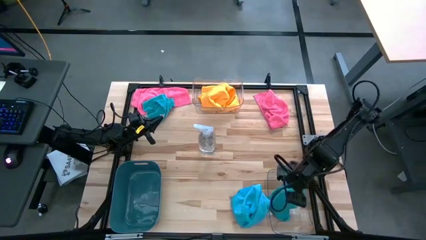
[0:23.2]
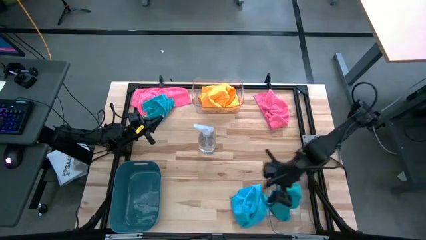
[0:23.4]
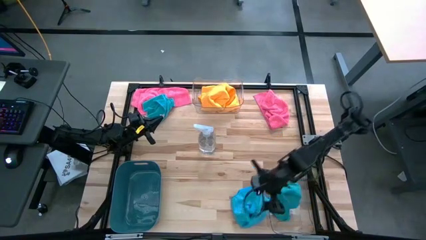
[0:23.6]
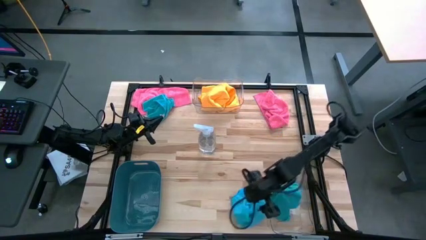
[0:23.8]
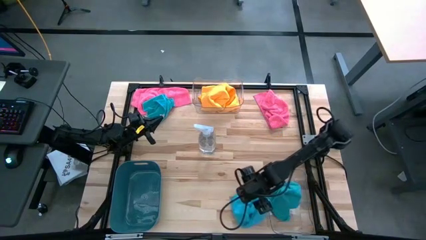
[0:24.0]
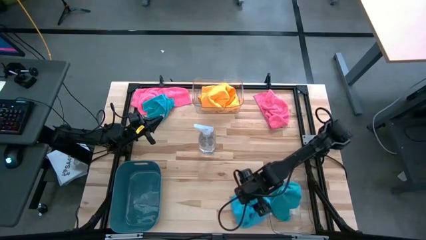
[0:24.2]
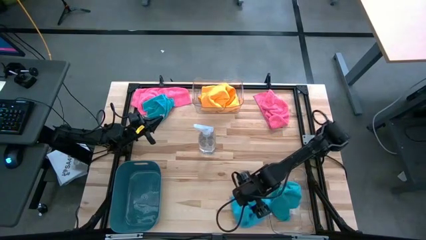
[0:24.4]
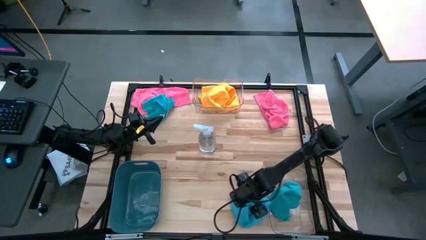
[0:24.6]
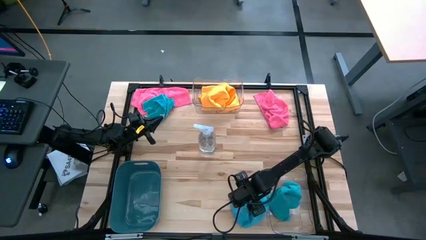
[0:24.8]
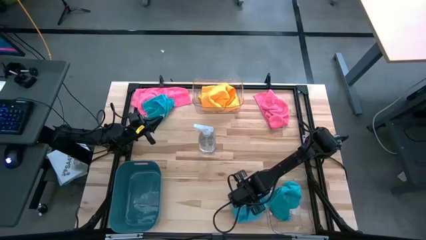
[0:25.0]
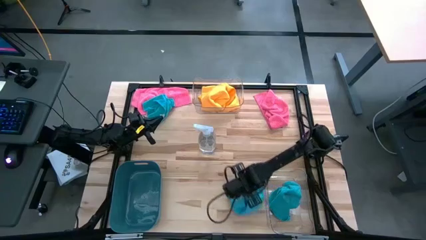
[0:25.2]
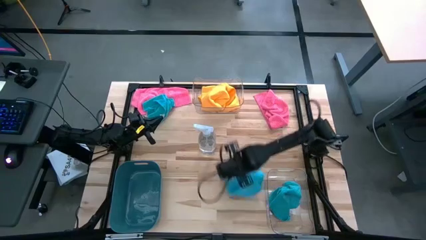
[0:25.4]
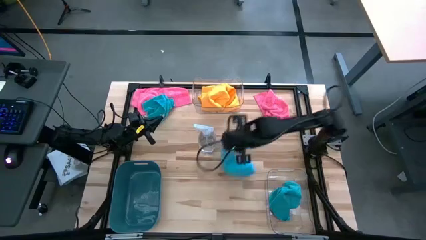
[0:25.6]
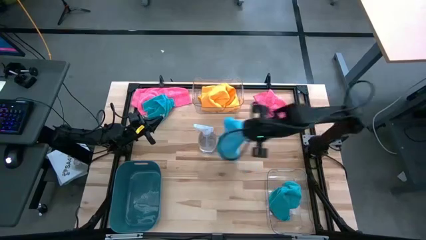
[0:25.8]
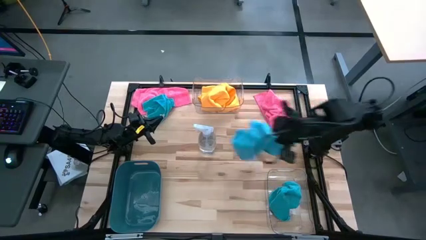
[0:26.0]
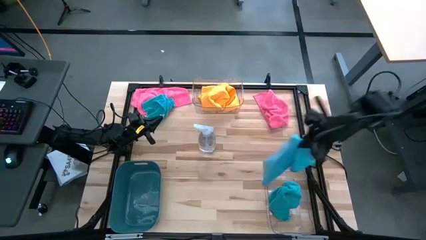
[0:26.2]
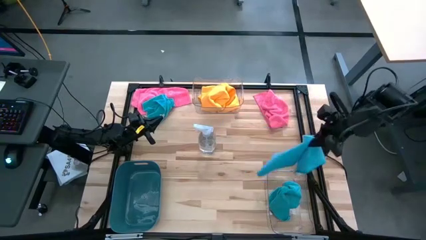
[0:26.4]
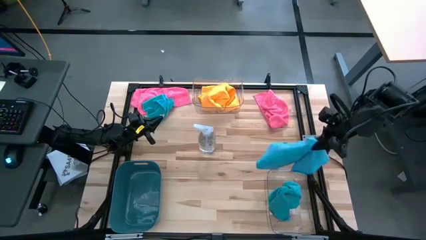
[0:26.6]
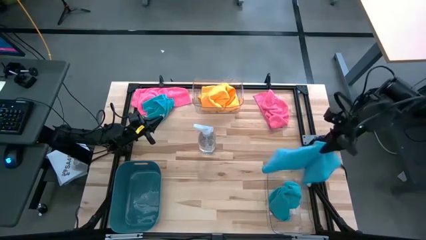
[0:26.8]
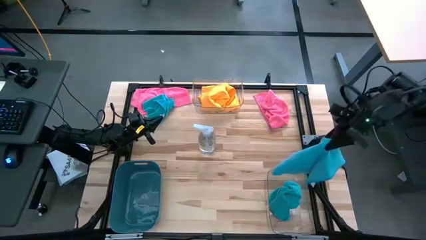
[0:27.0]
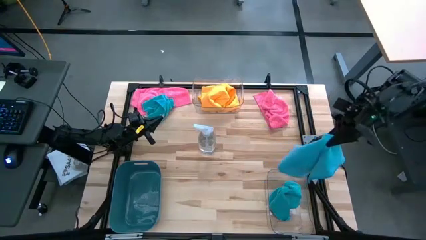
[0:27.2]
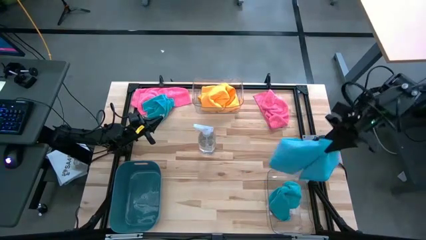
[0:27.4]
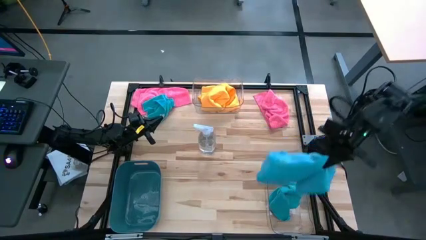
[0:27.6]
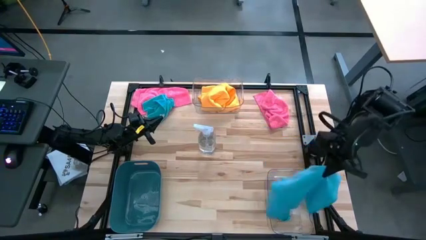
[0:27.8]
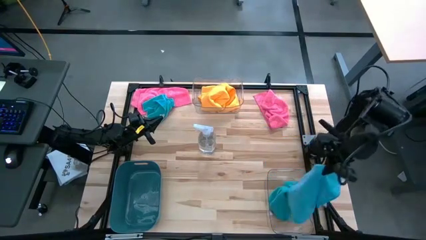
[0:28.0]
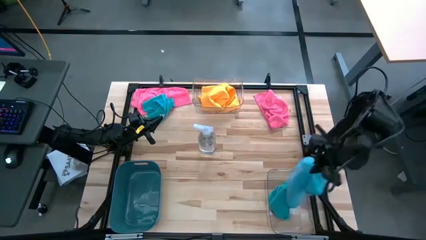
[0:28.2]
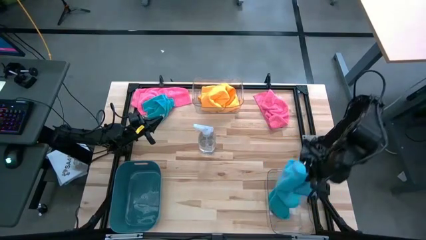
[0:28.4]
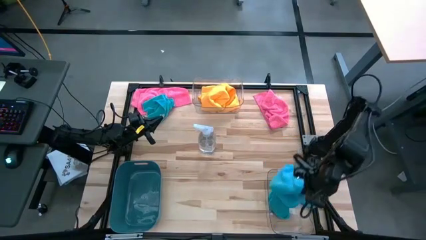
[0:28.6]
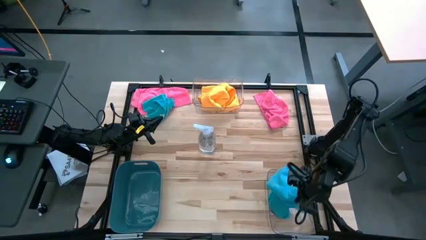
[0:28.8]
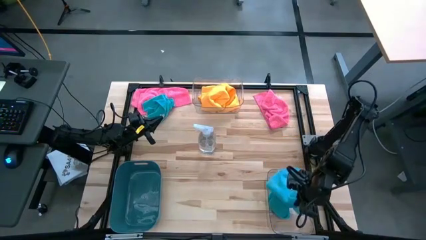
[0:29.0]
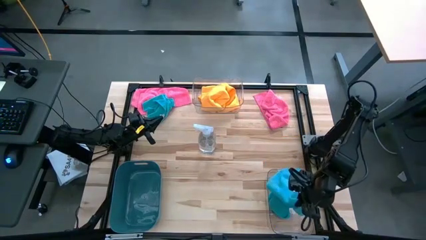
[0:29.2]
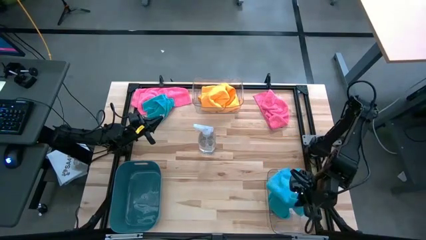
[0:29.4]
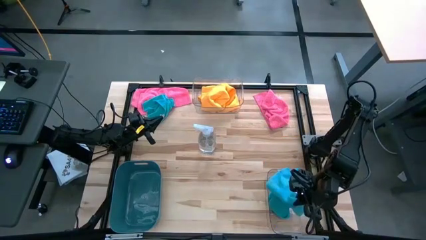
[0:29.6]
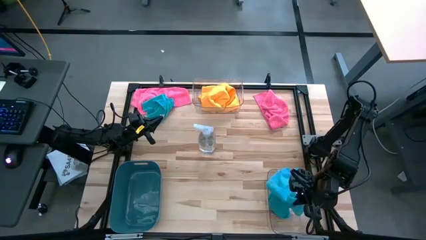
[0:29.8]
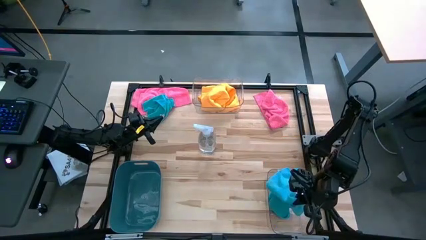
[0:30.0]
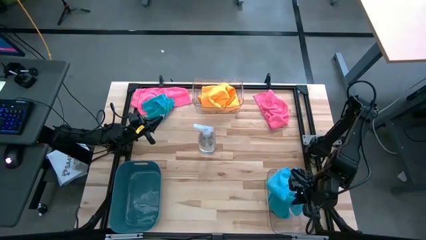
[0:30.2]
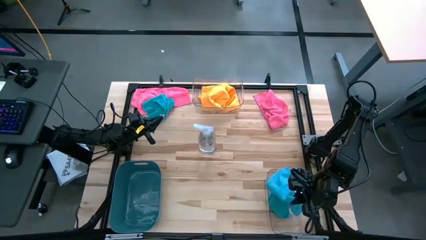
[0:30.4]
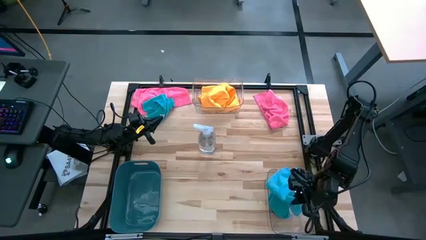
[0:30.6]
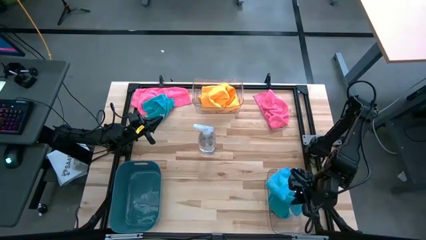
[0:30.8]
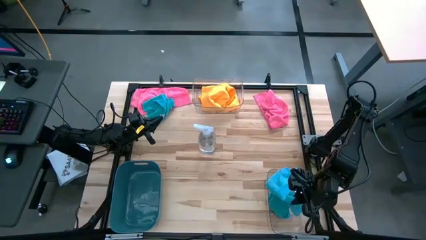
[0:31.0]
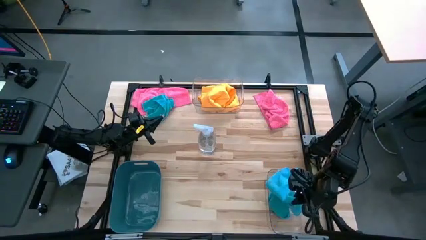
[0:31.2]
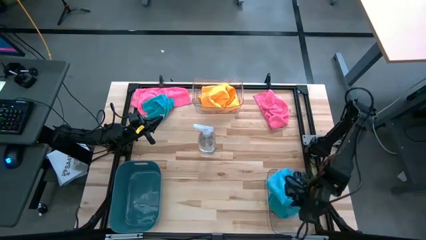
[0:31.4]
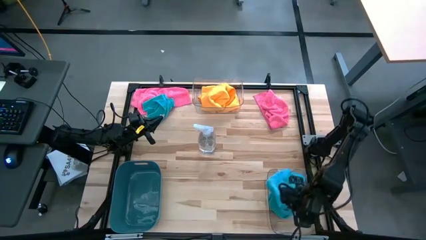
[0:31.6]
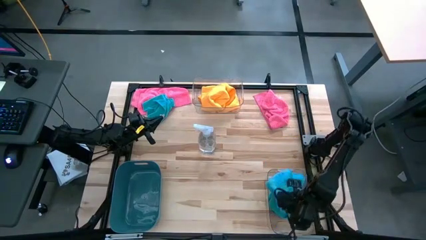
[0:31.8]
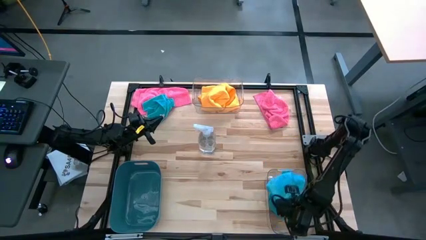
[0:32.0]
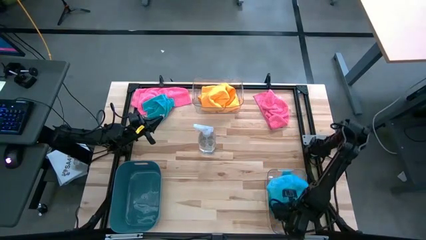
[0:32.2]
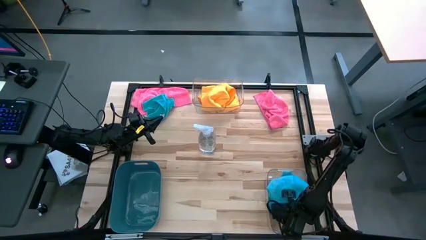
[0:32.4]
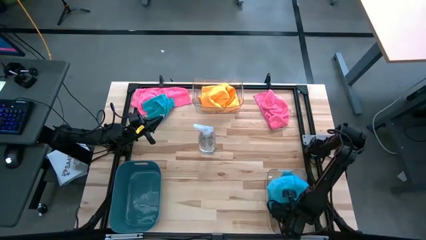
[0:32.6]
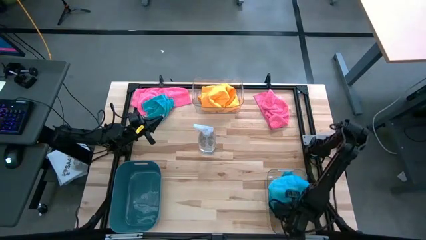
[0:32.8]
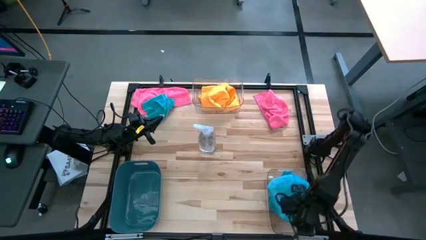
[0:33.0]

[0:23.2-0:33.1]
Task: Sort microfiber towel by color & place in baskets
Put the bottom blue microfiber cloth into the bottom transparent bin

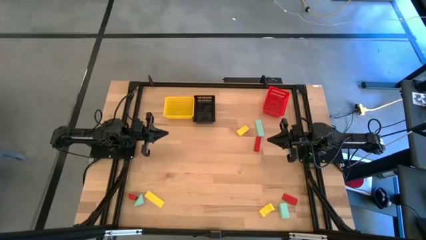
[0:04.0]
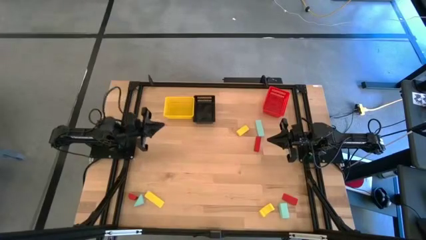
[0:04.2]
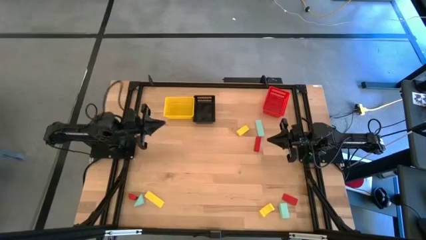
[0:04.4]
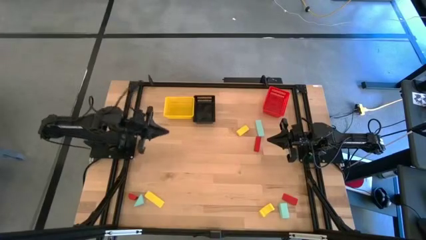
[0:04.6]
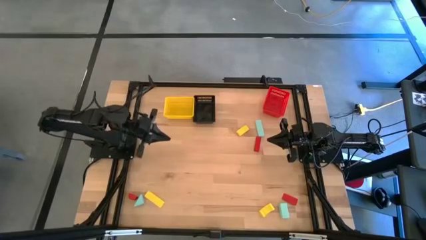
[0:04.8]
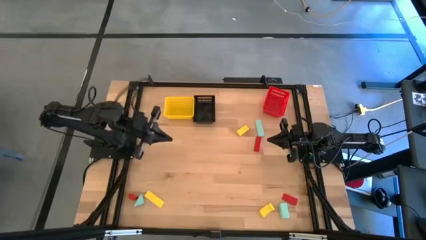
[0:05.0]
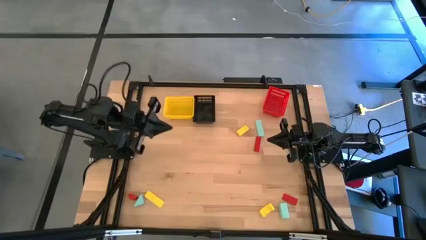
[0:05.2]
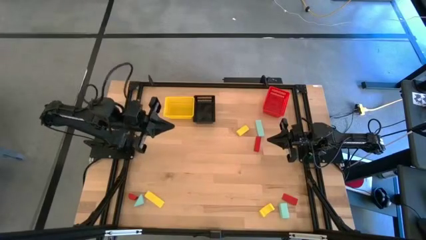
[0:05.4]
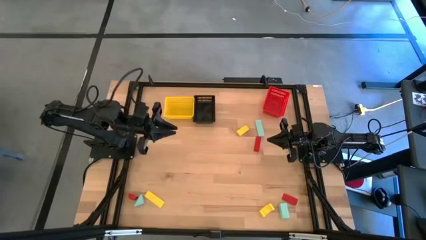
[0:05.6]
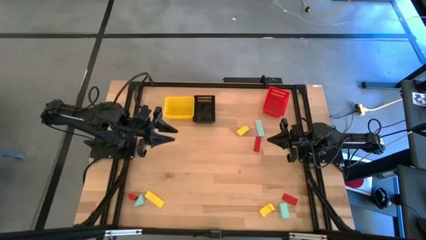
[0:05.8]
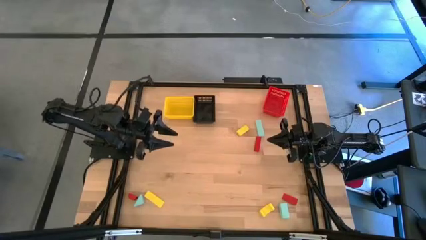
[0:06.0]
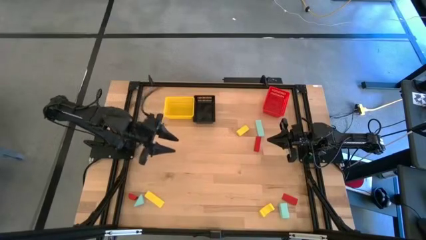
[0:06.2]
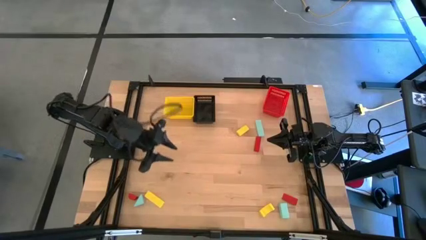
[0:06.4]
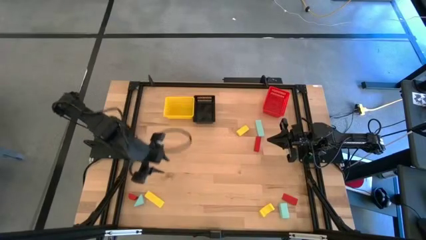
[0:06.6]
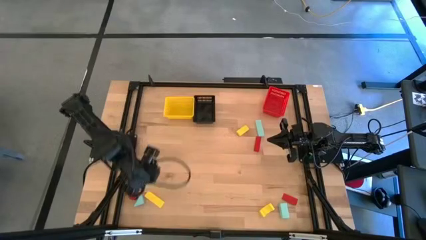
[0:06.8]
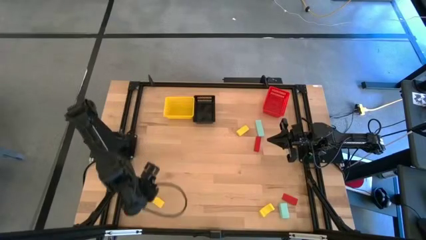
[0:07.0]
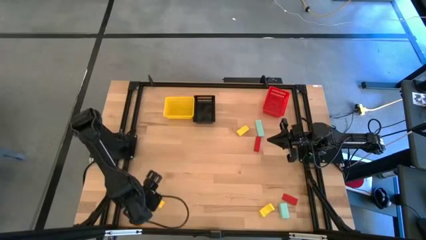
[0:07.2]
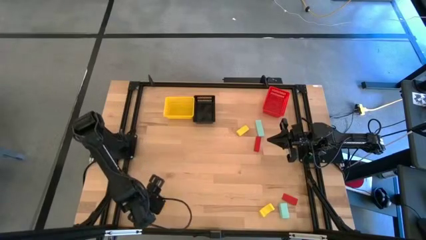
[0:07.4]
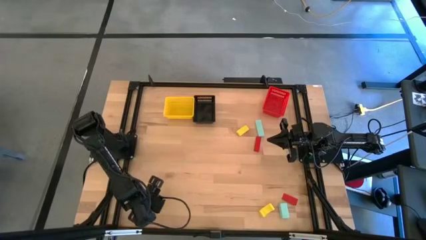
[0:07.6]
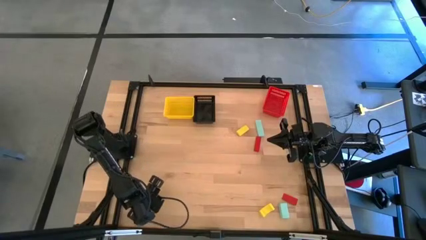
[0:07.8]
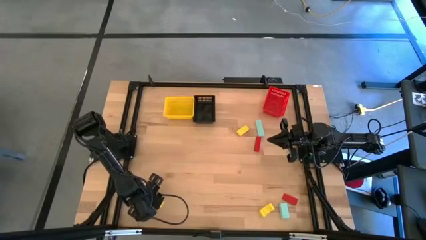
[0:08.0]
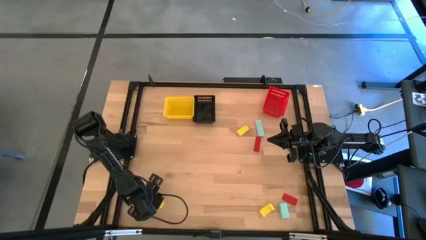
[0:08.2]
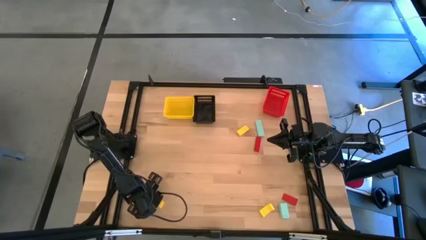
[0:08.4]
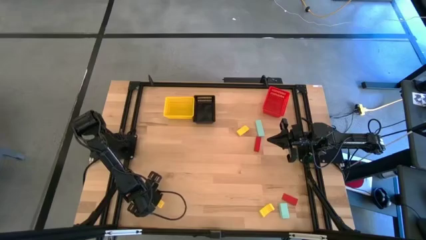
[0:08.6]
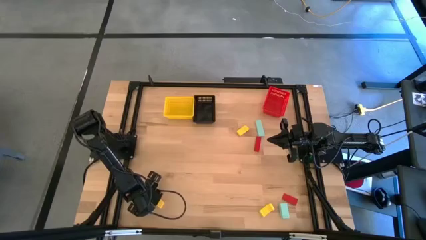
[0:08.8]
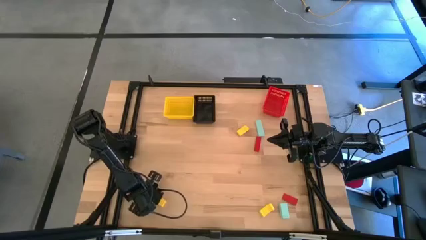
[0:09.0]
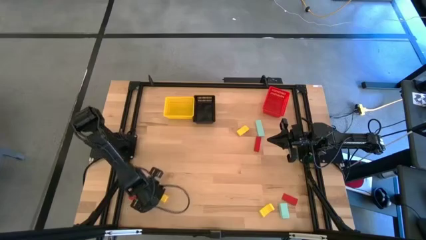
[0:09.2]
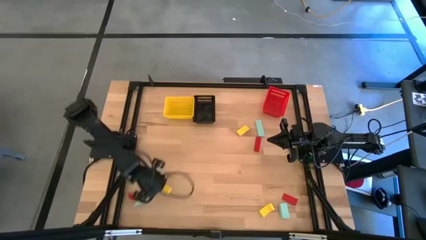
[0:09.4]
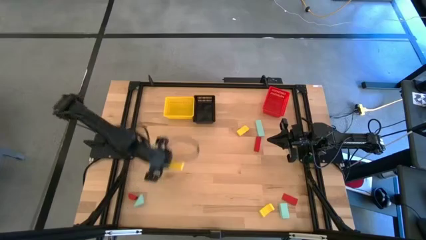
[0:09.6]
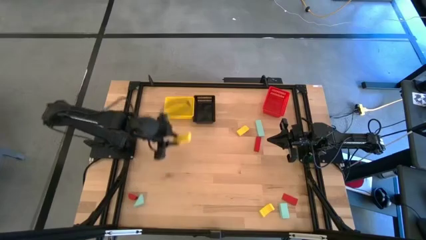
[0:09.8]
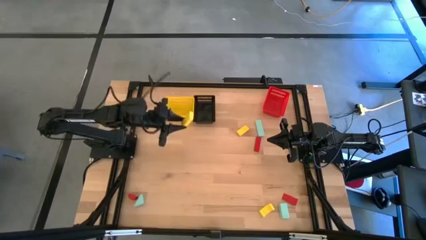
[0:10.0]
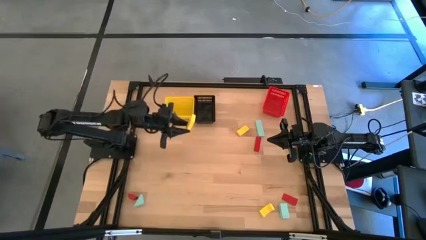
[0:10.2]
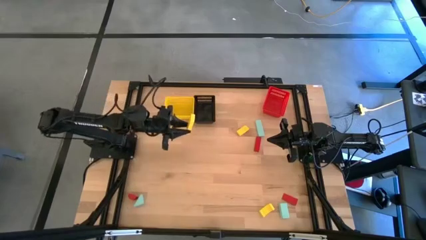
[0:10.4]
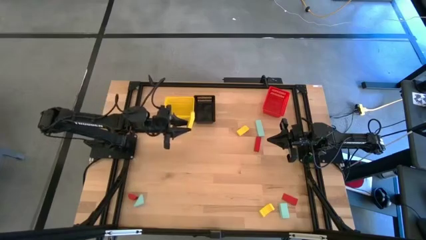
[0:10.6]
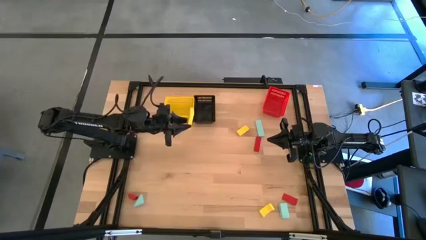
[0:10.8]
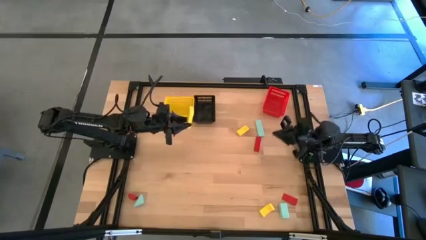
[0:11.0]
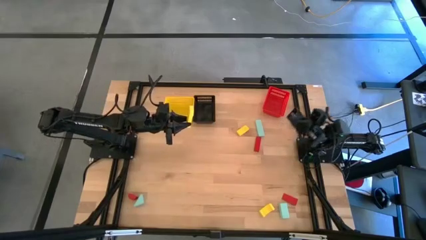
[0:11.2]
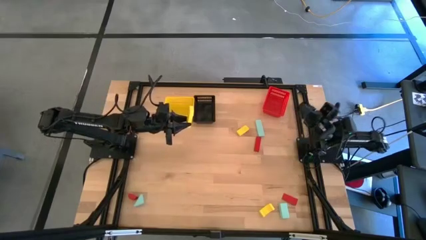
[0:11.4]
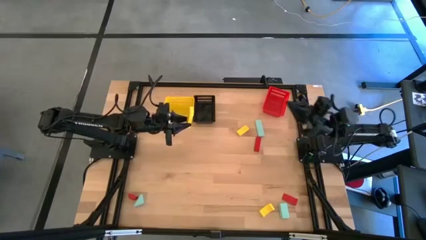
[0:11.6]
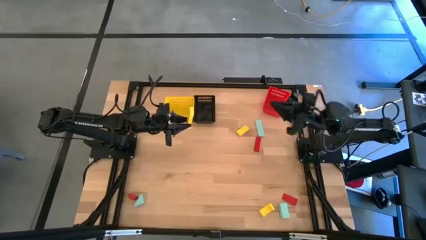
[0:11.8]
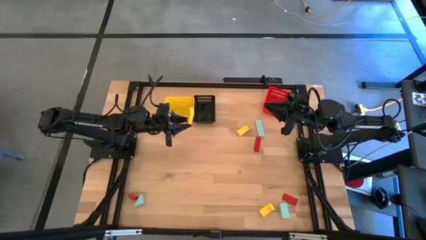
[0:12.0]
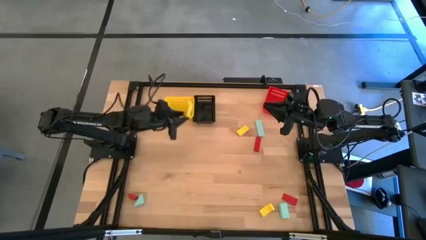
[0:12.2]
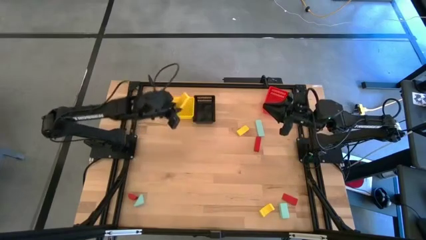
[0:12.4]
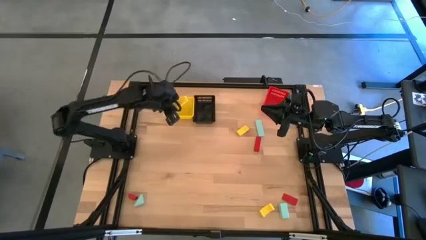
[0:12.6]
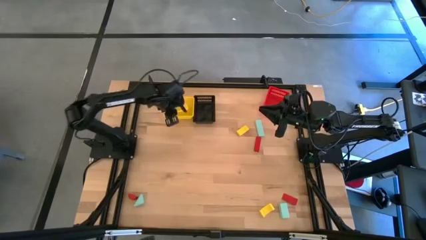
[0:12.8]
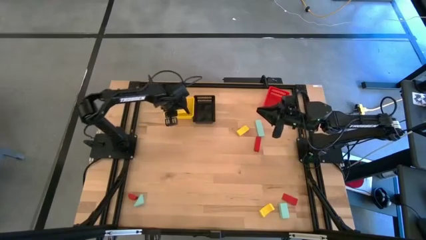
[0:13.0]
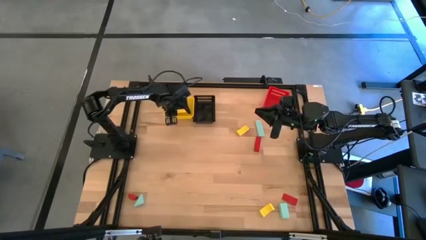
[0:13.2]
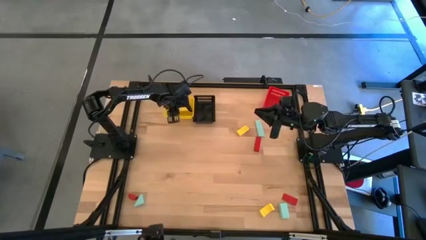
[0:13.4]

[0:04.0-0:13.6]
Task: Sort & place blocks by color
Put the bottom left yellow block into the yellow bin
